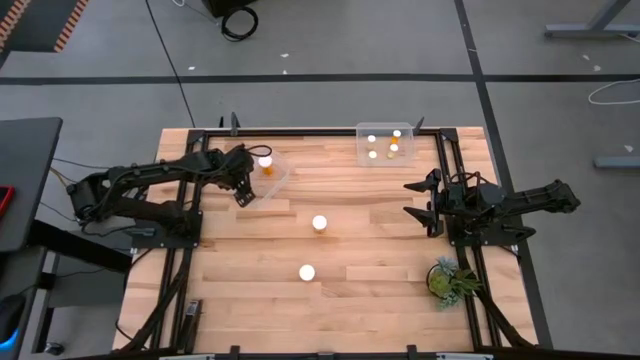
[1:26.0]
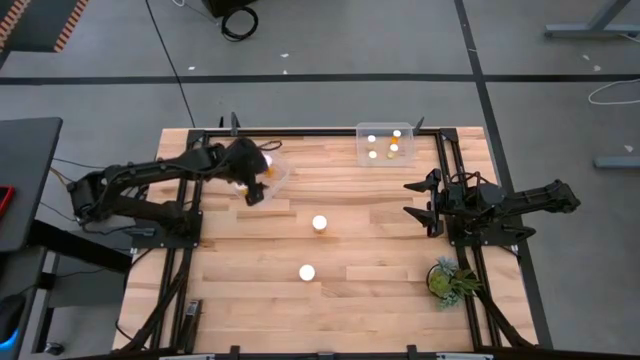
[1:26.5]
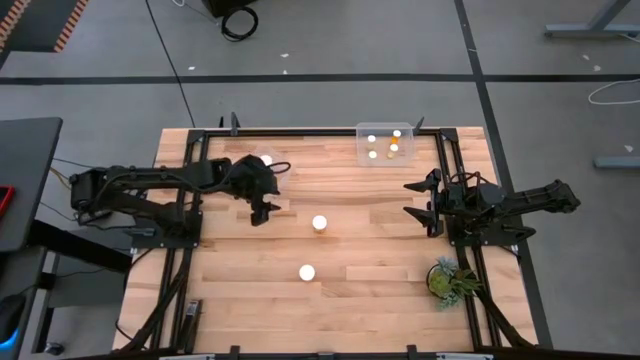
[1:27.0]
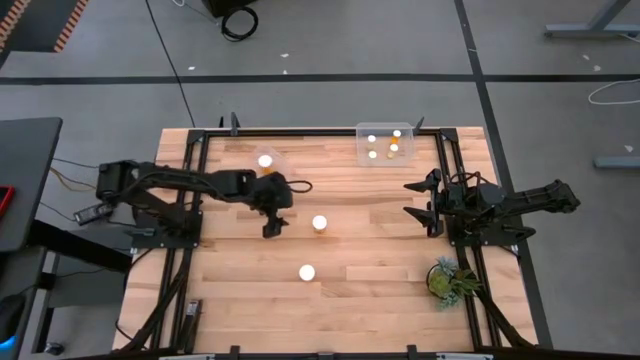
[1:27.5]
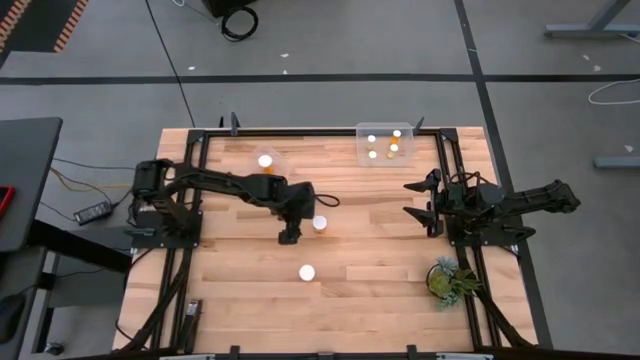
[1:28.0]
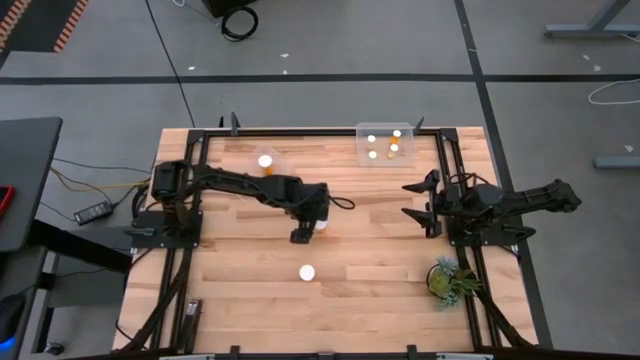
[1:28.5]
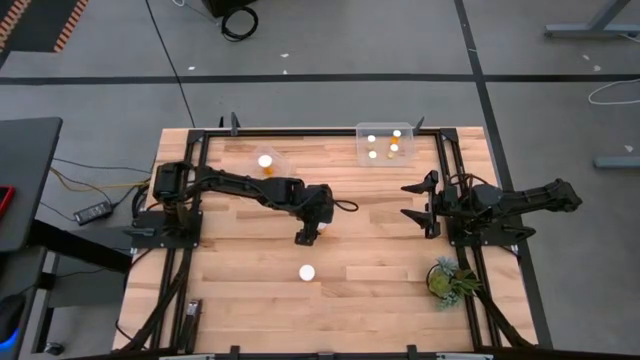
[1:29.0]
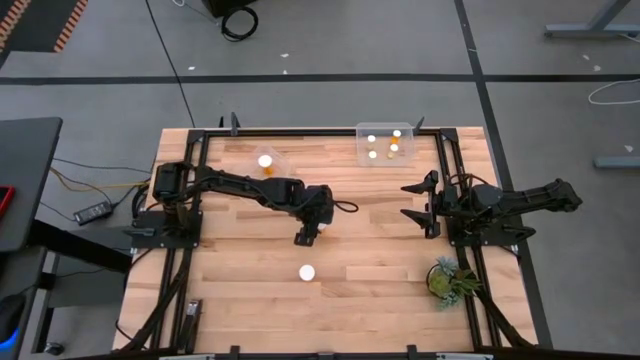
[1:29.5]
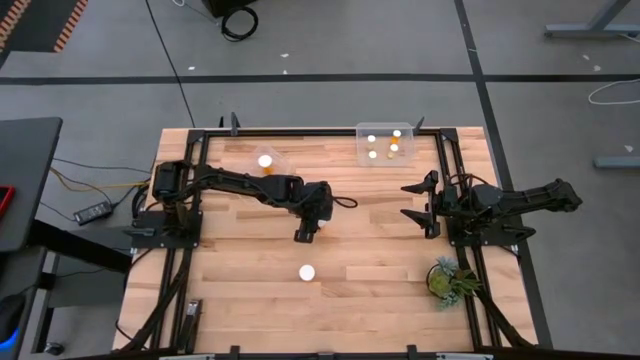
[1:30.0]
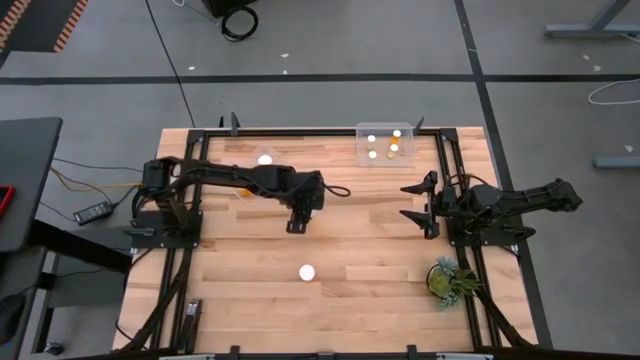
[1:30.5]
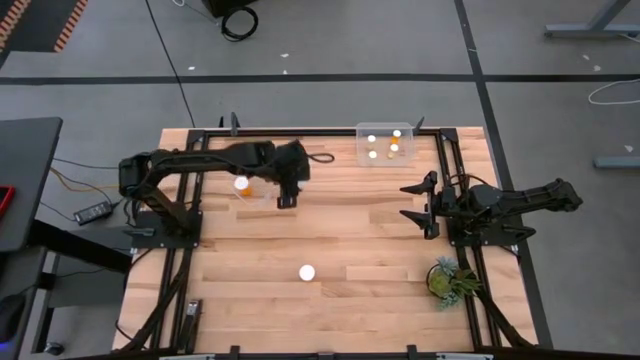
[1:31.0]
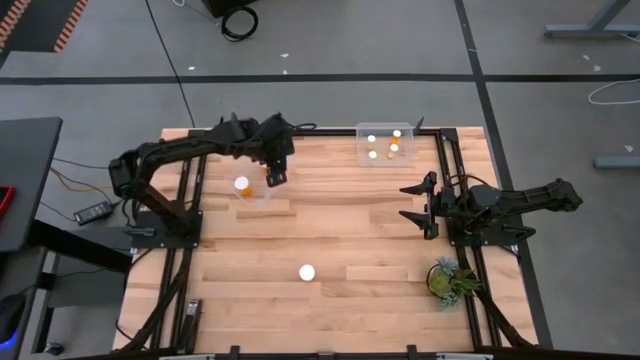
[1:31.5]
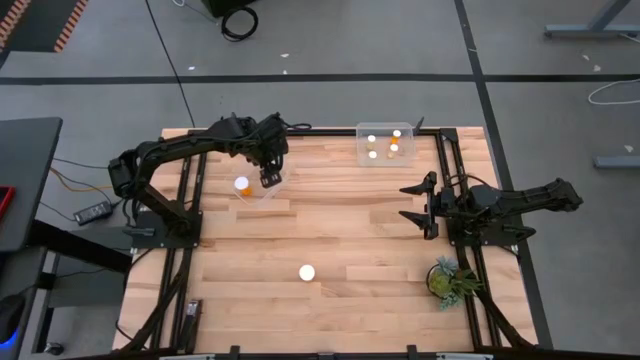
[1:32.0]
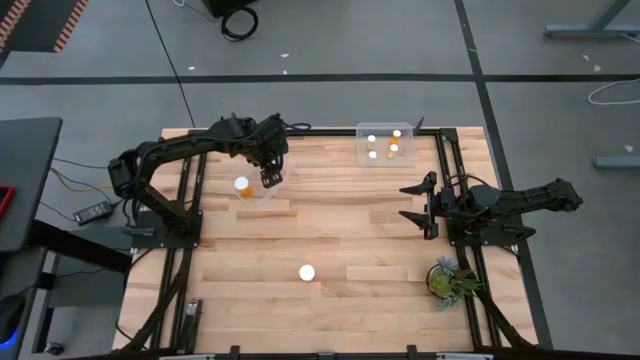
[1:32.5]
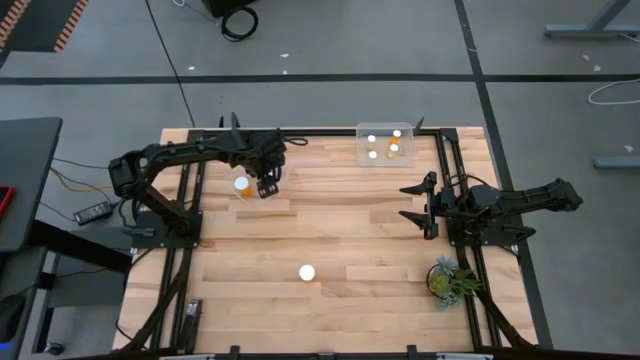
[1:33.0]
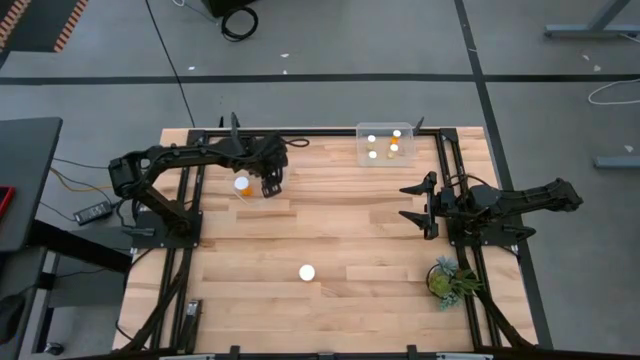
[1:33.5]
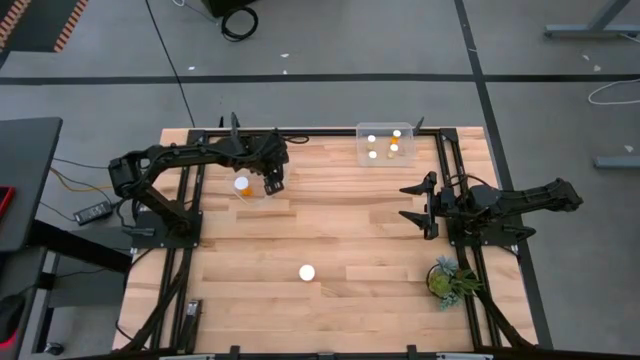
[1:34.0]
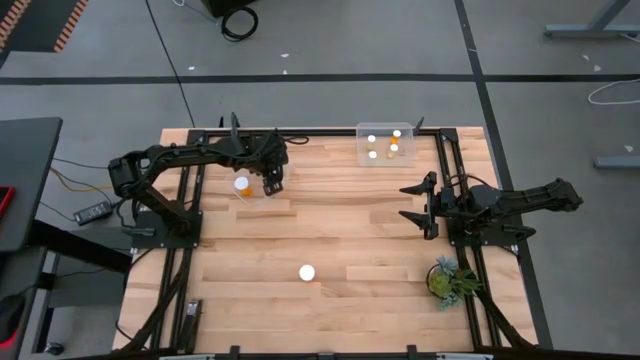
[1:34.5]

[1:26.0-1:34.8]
Task: Pick and place medicine bottles into bin by pill shape (circle, oval)
Put the top orange pill bottle into the left transparent bin

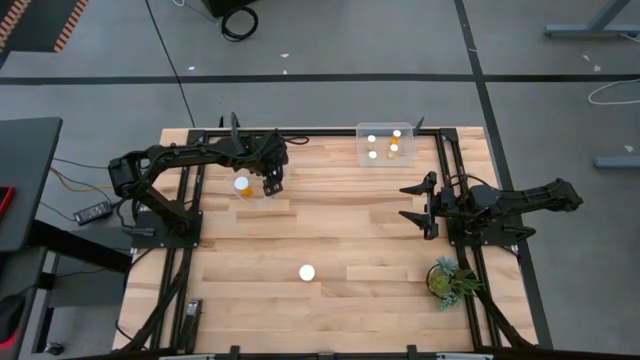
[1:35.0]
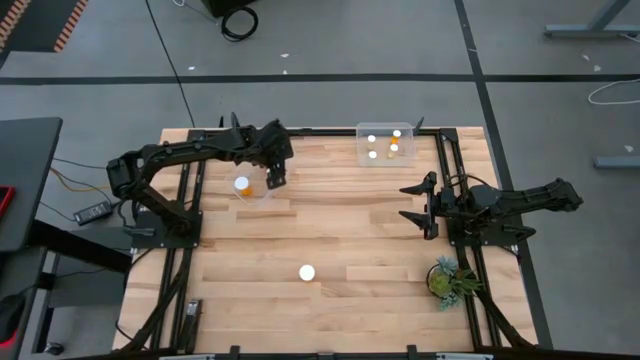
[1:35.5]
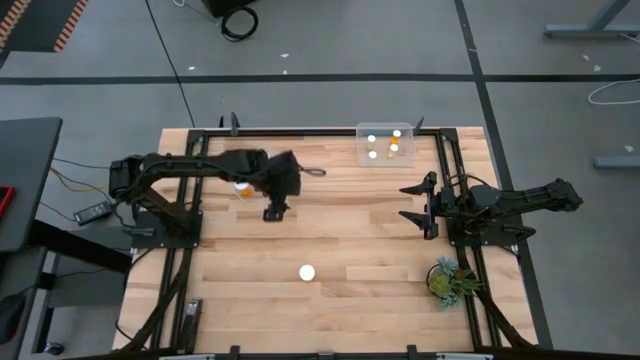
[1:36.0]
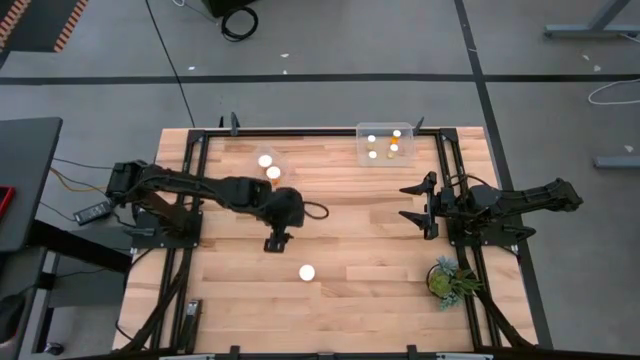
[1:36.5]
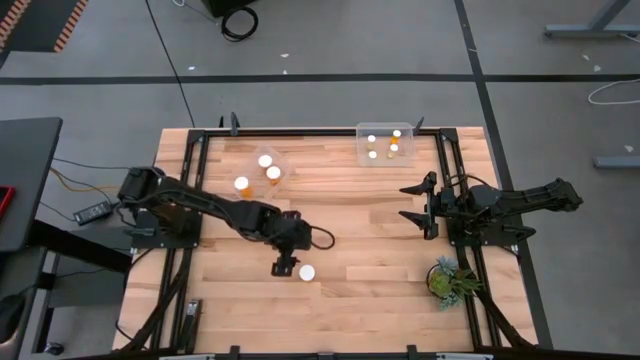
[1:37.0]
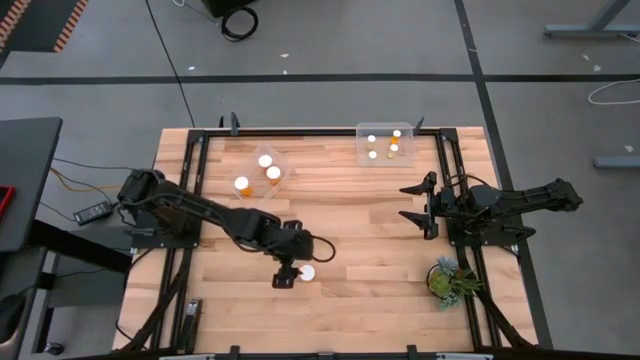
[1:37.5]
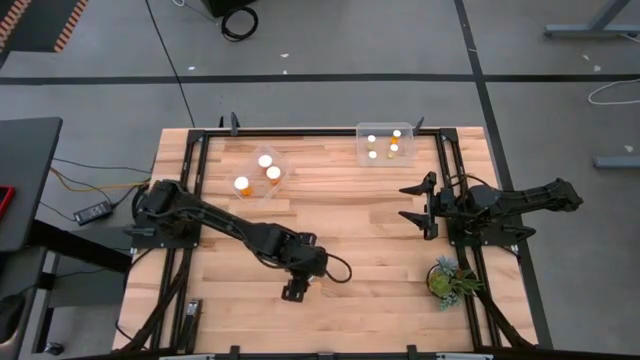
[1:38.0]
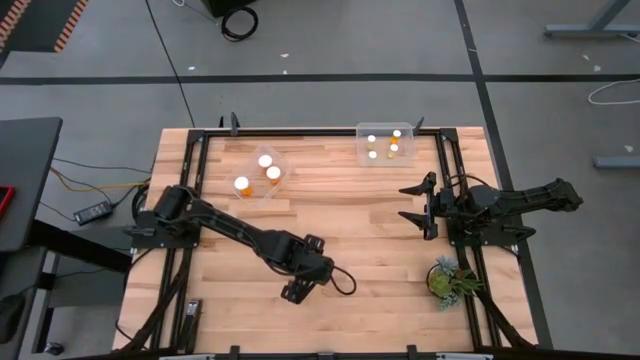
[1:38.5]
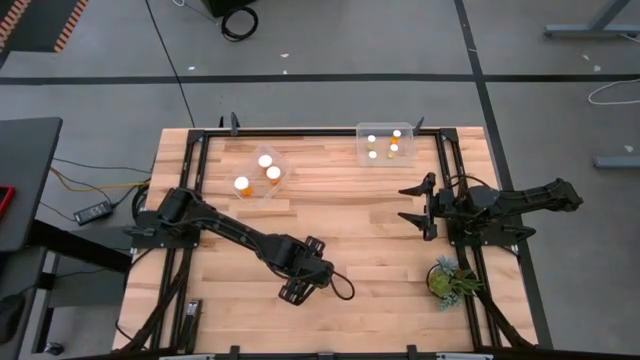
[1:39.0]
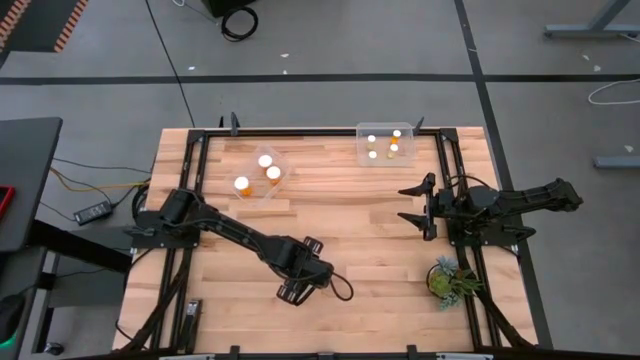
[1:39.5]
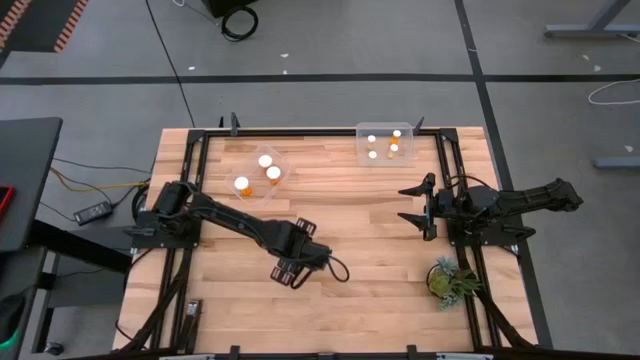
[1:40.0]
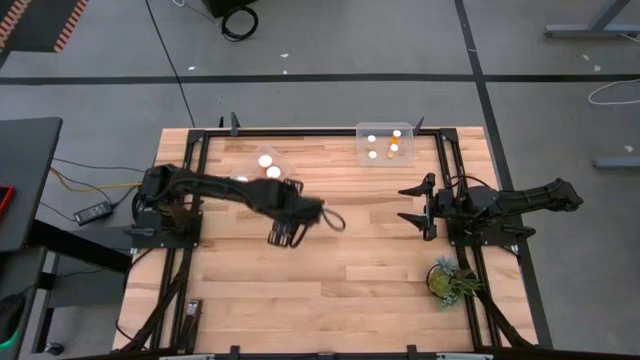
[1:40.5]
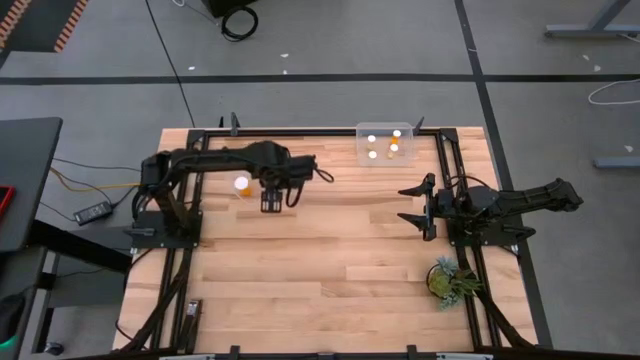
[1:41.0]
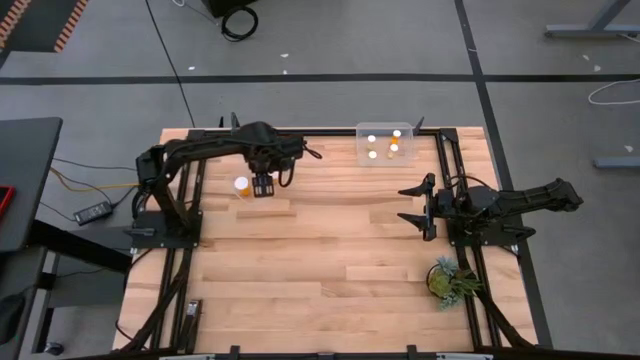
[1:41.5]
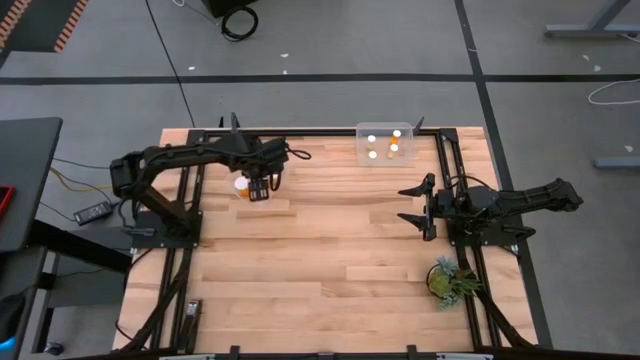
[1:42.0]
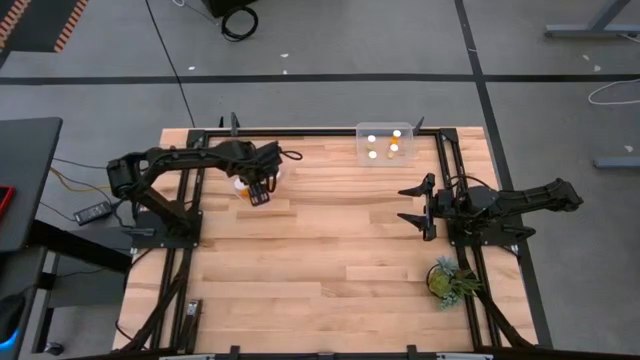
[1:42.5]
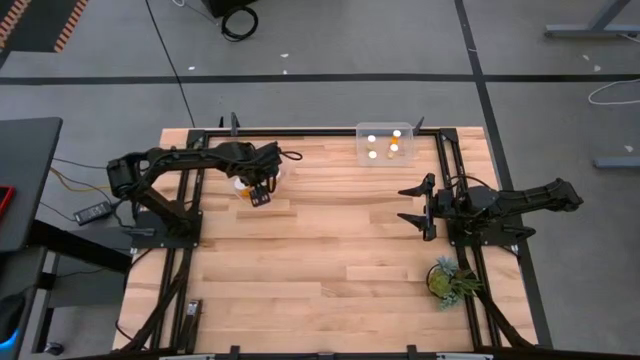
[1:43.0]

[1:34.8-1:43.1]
Put the orange pill bottle into the left transparent bin

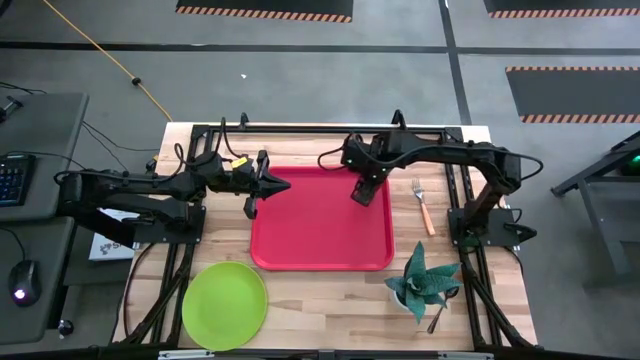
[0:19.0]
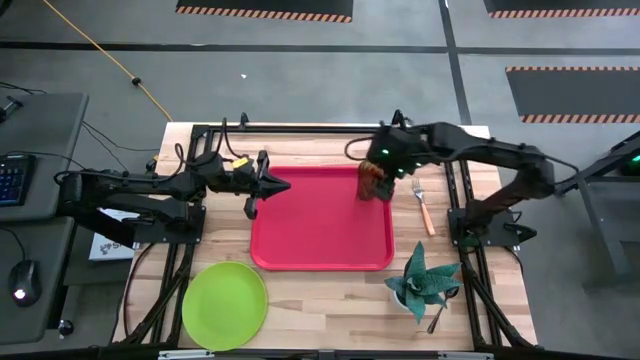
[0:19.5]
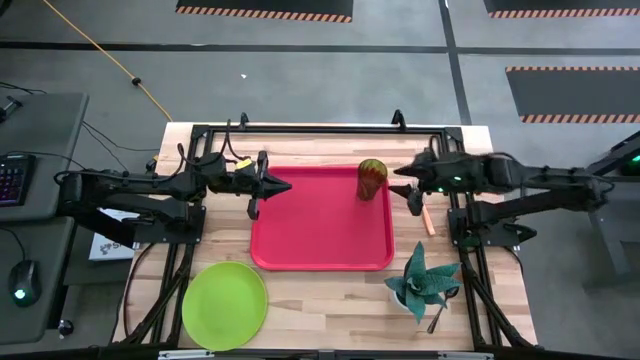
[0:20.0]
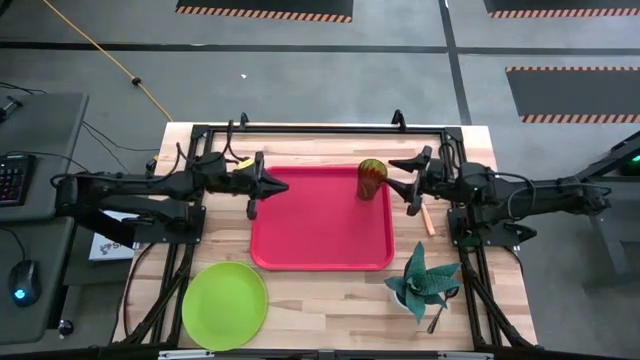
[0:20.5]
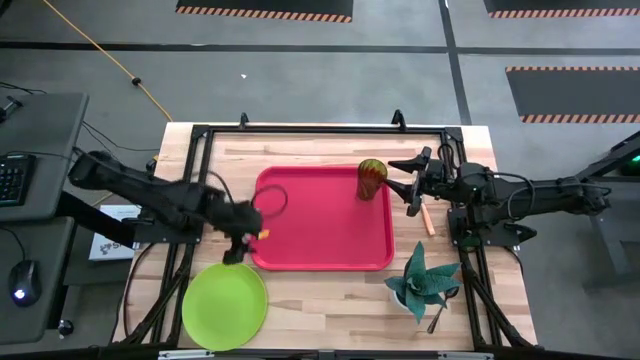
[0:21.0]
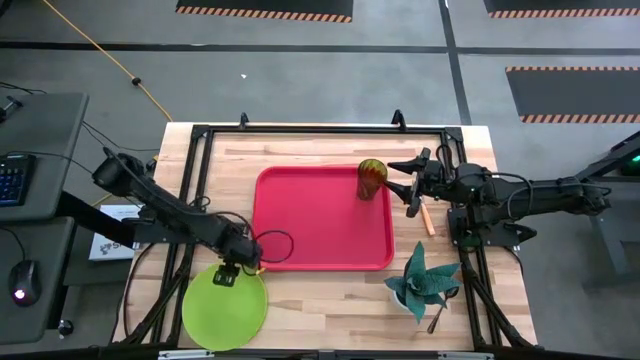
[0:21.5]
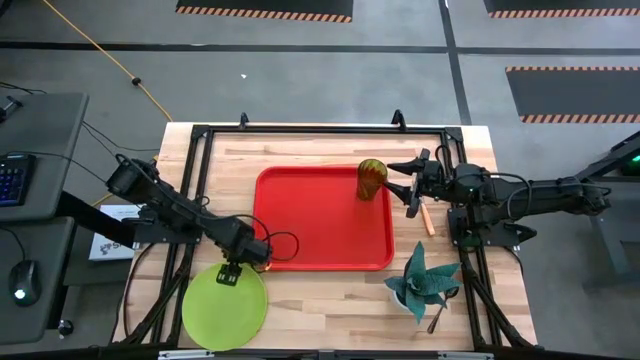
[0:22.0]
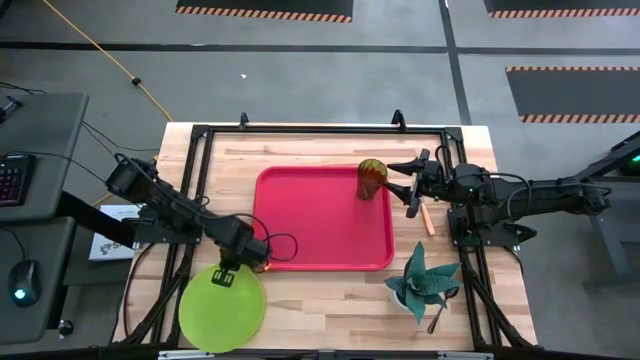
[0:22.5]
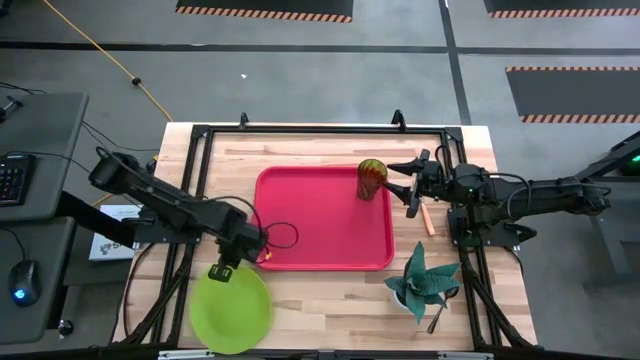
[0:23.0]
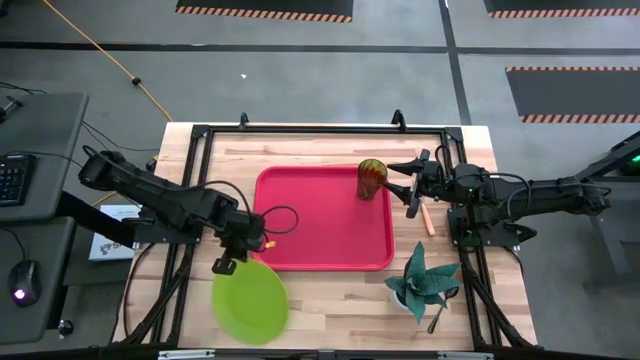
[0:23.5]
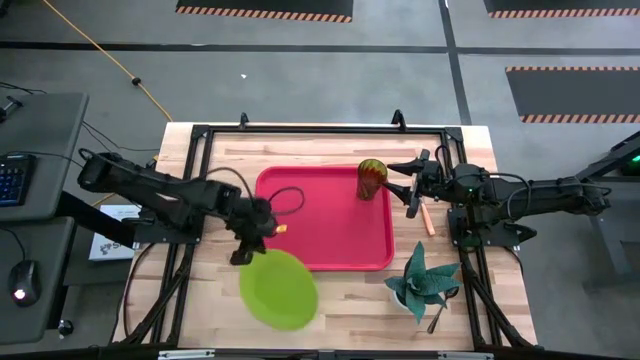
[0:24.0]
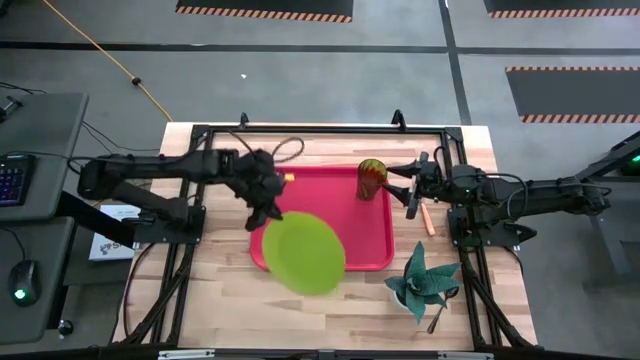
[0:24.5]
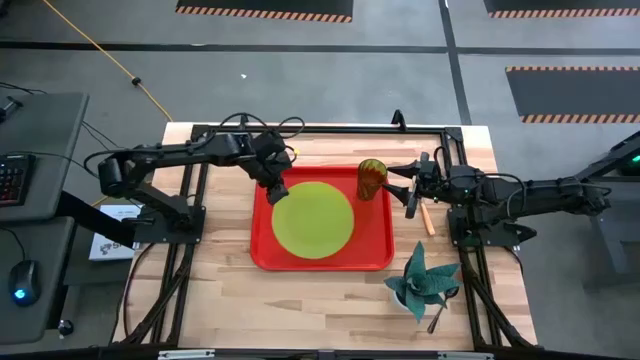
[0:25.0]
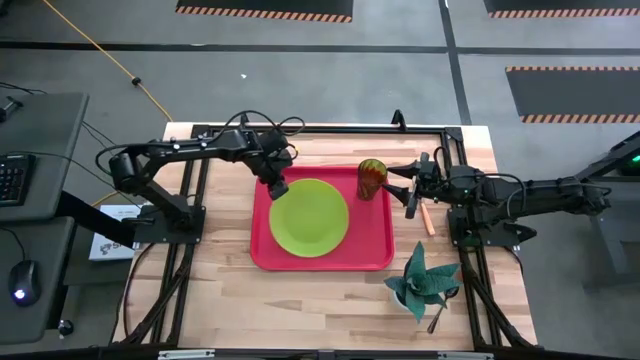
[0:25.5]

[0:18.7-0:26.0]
Task: Pick and place plate/cup/fork/spoon on tray
Put the green plate on the red serving tray to the left of the green cup
